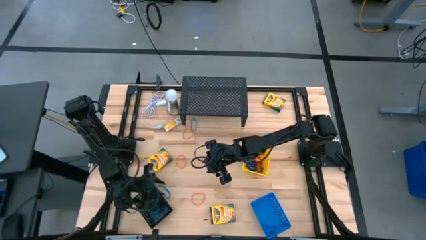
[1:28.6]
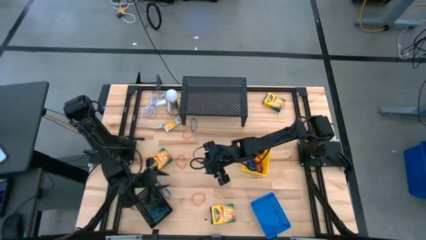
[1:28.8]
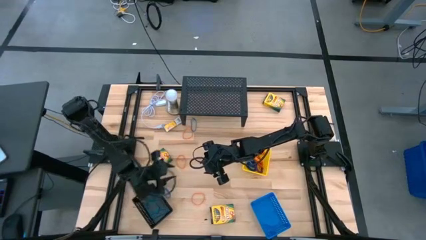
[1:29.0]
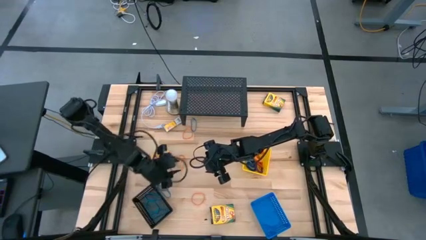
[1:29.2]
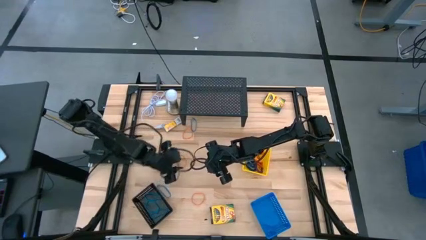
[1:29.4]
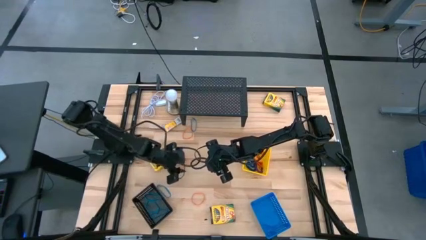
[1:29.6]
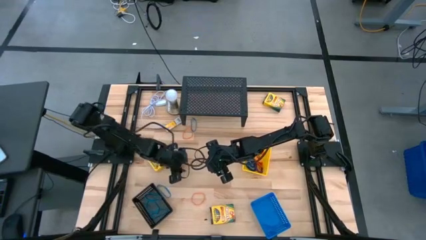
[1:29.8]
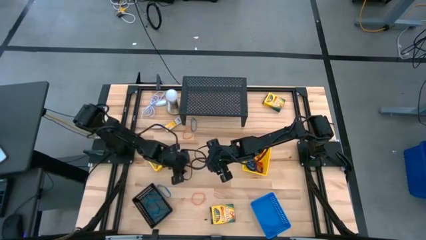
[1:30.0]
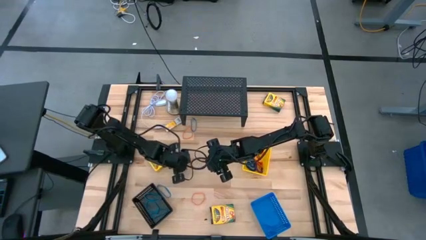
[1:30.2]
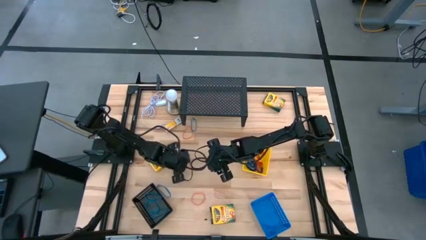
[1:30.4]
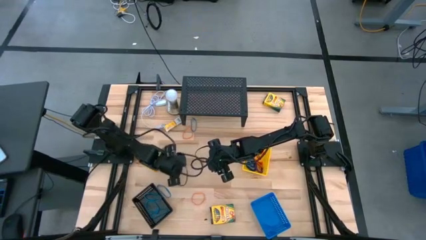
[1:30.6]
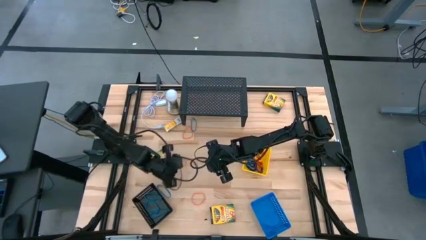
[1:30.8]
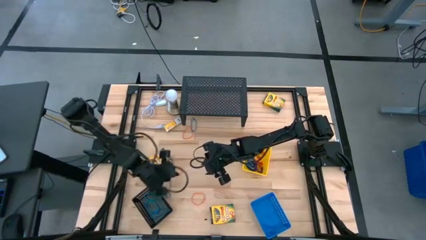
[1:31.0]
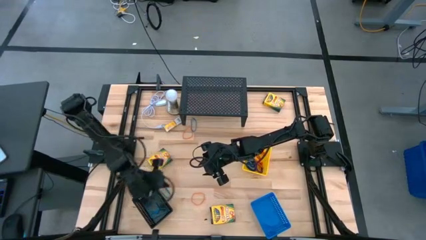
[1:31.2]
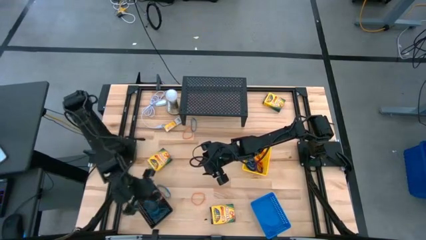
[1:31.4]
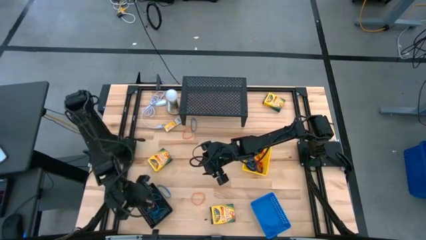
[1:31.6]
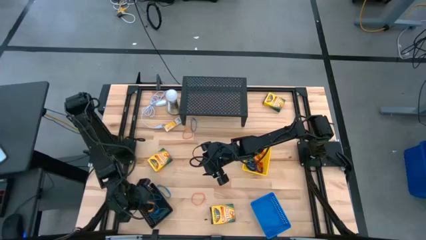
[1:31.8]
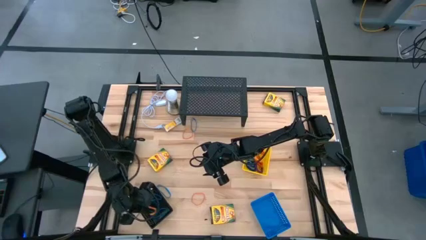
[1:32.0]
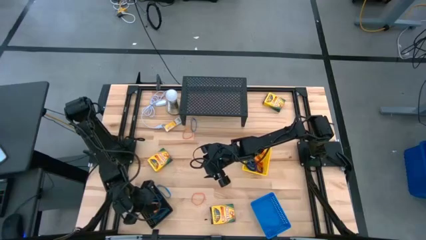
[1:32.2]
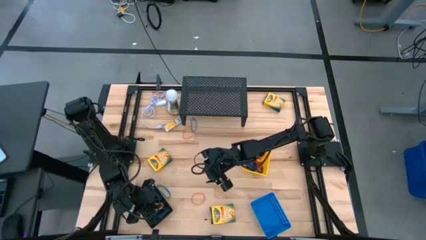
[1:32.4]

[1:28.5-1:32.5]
Task: Pick & Place Office Desk Supplies
Put the orange rubber band into the black basket

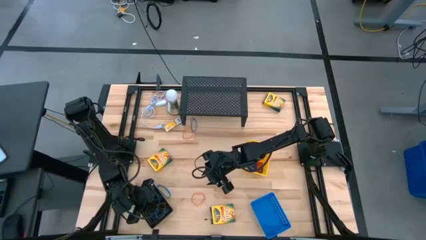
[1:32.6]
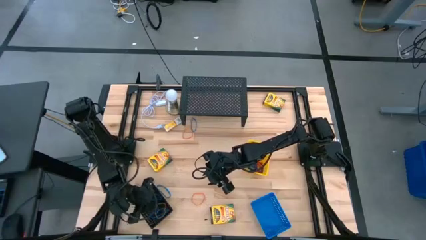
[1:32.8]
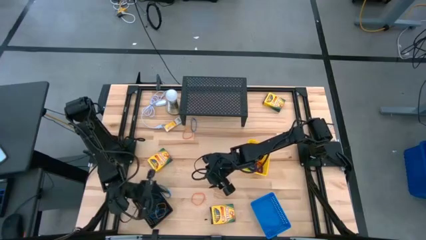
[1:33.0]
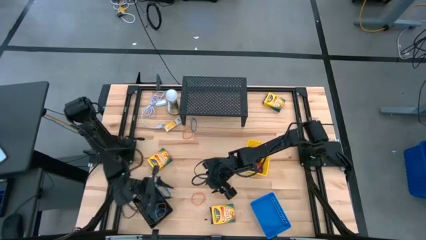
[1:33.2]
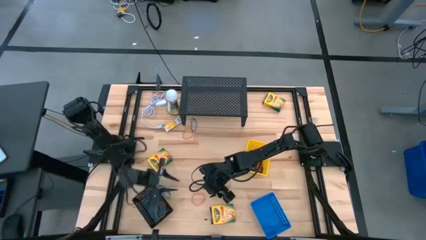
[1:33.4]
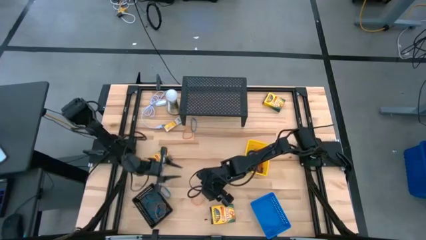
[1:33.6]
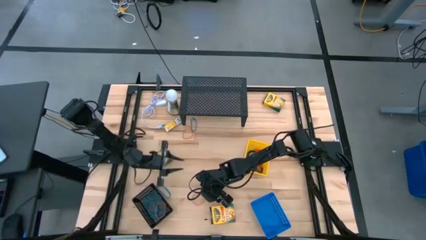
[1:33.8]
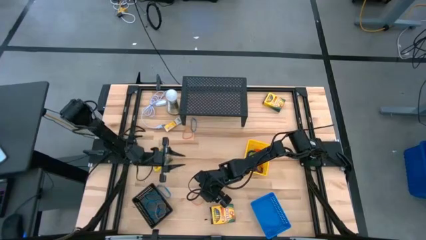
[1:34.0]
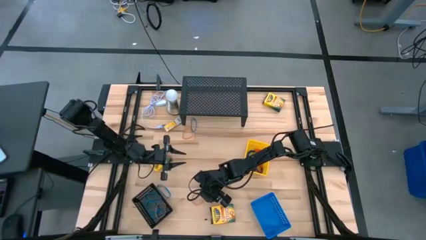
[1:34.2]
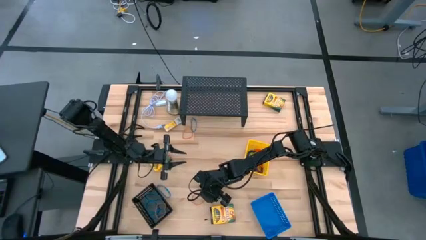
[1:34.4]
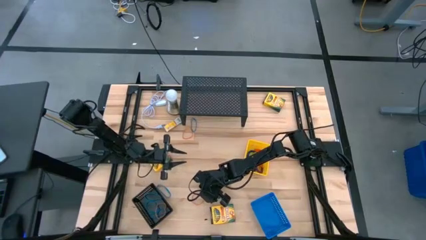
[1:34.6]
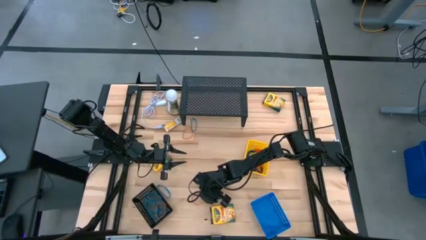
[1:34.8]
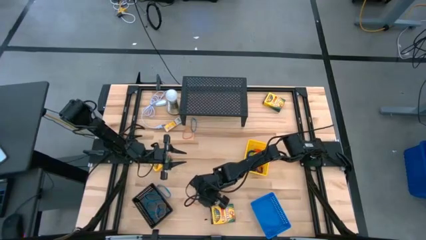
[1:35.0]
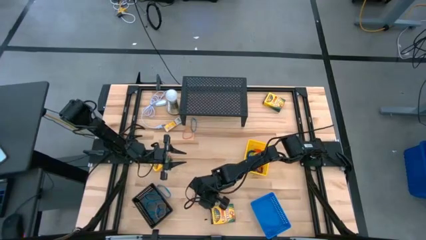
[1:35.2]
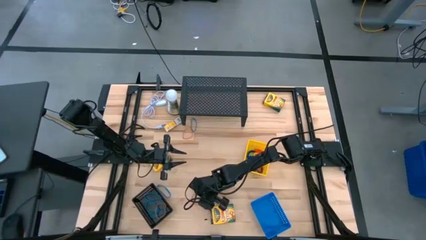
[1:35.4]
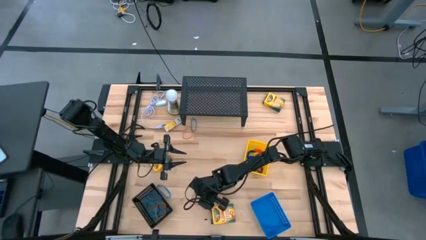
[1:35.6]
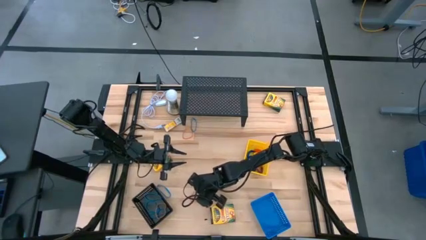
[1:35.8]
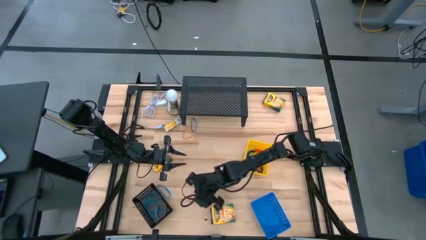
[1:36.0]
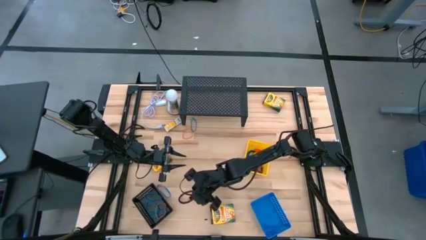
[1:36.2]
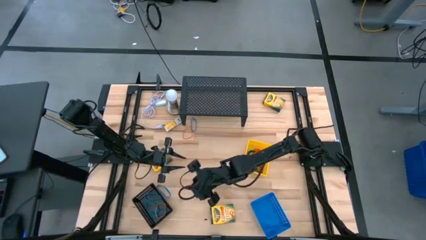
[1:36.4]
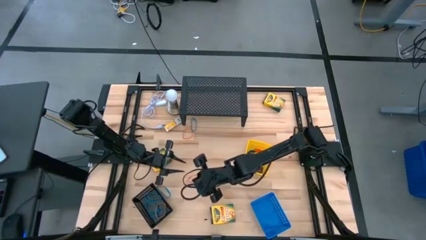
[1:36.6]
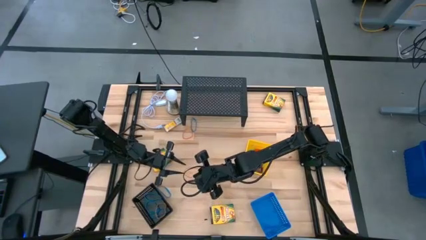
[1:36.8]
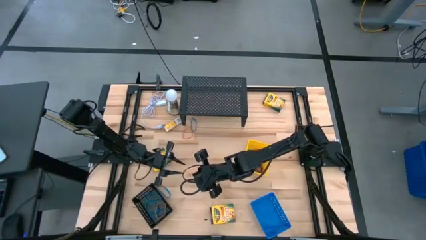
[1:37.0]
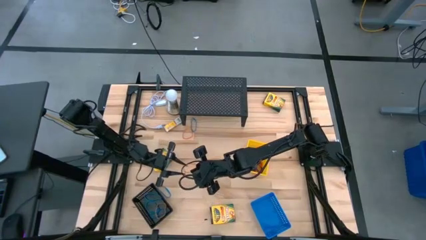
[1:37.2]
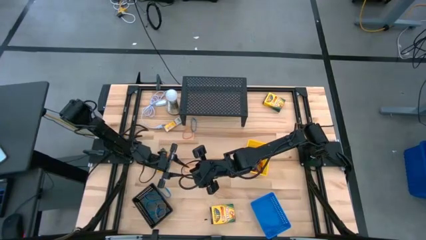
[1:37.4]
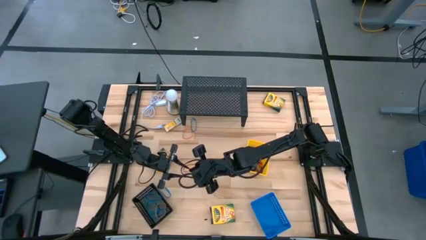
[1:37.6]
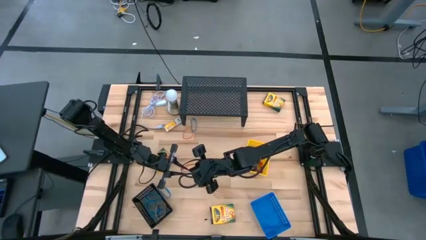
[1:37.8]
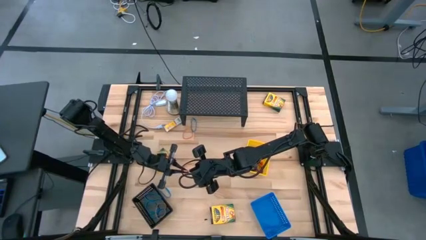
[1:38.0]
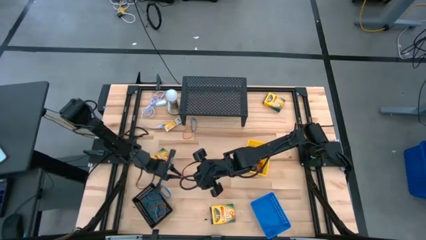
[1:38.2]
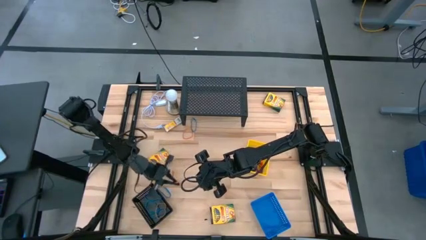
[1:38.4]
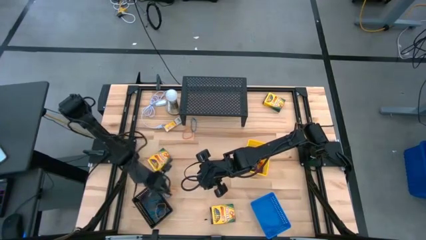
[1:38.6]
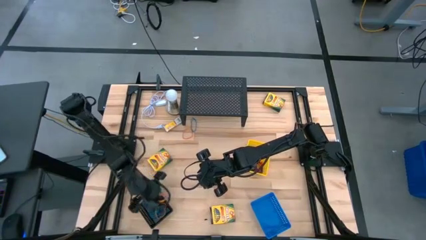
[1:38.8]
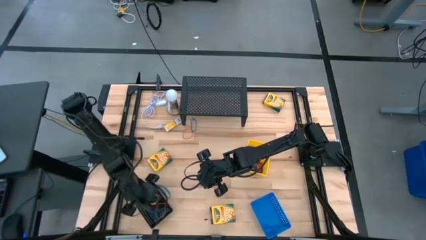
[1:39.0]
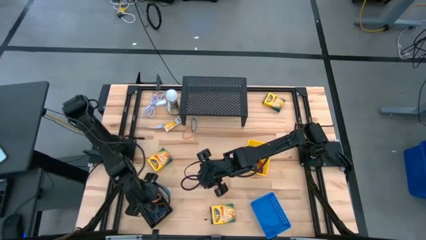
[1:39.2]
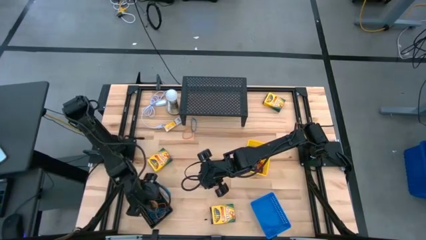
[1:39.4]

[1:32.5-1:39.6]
Put the orange rubber band into the black basket

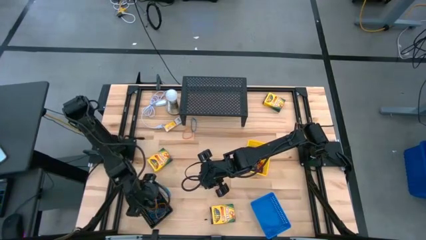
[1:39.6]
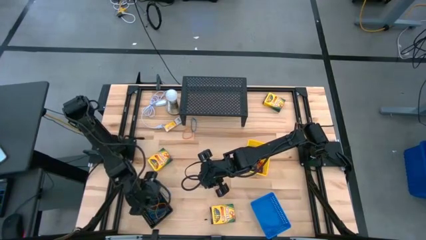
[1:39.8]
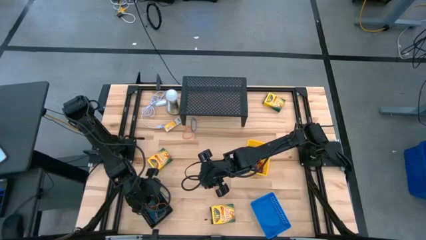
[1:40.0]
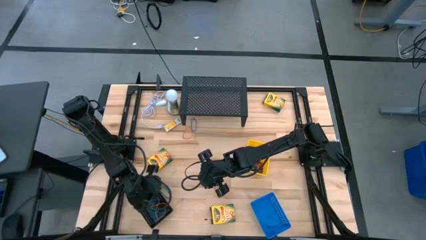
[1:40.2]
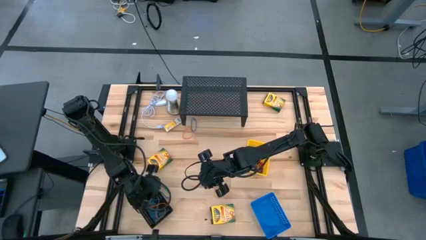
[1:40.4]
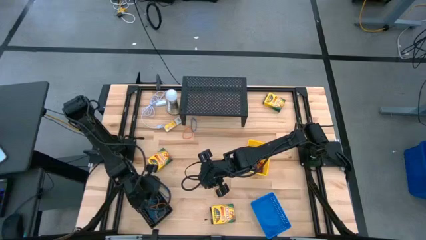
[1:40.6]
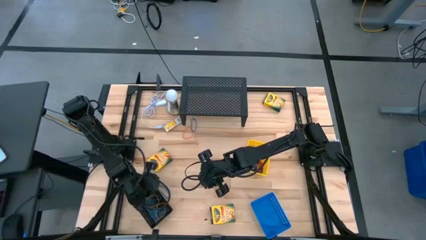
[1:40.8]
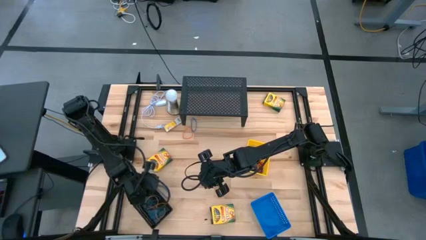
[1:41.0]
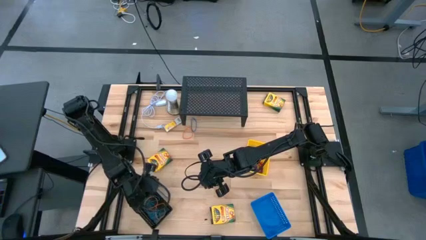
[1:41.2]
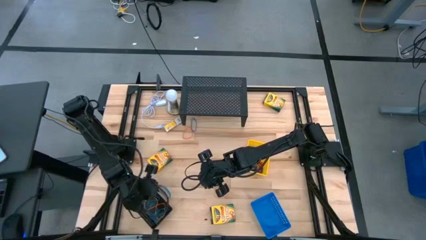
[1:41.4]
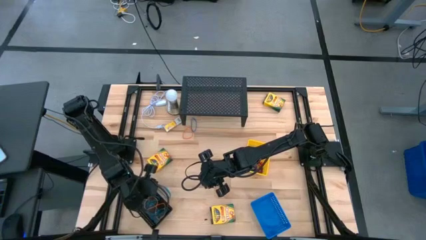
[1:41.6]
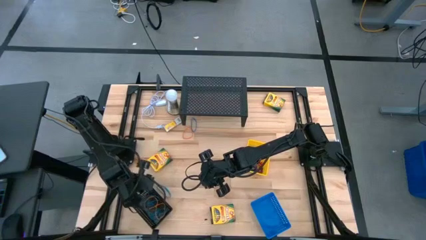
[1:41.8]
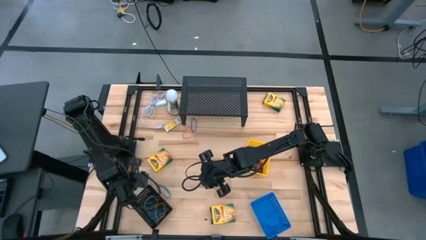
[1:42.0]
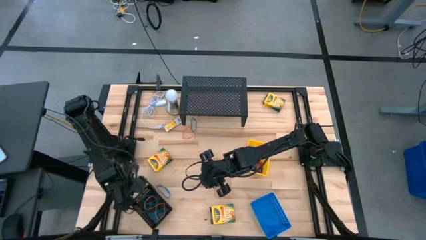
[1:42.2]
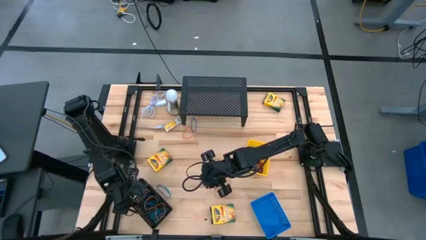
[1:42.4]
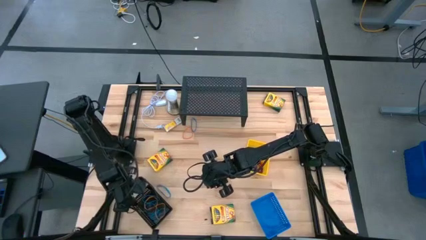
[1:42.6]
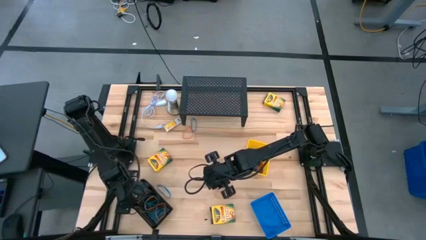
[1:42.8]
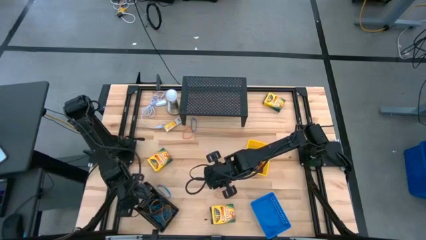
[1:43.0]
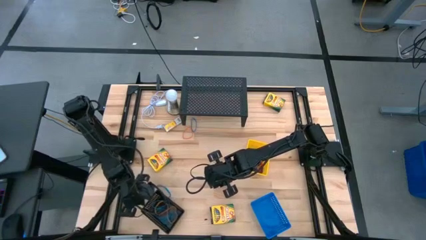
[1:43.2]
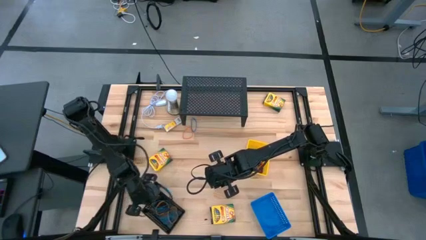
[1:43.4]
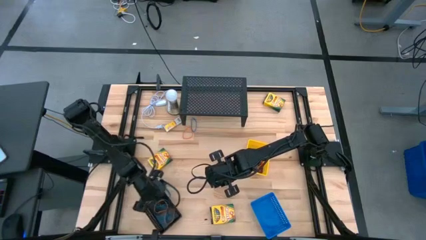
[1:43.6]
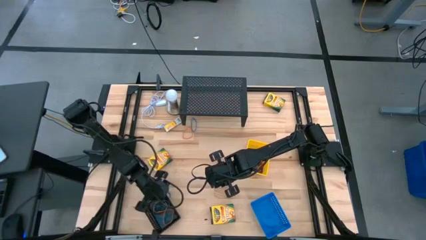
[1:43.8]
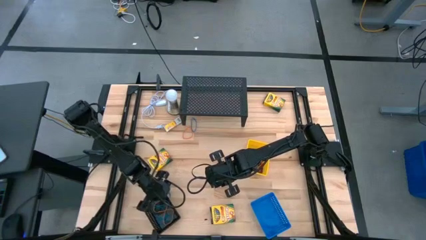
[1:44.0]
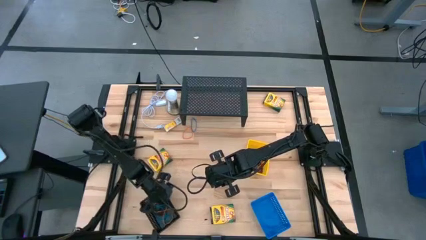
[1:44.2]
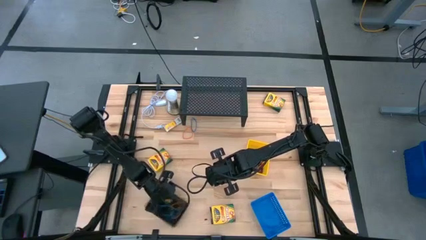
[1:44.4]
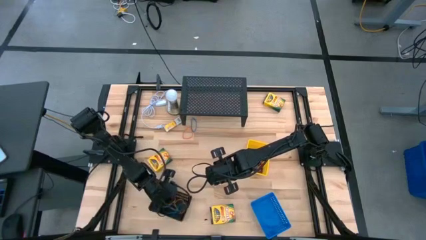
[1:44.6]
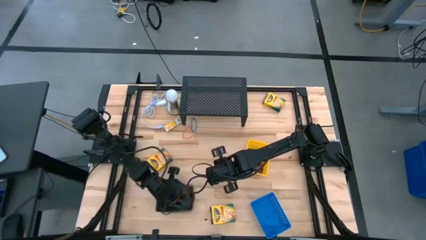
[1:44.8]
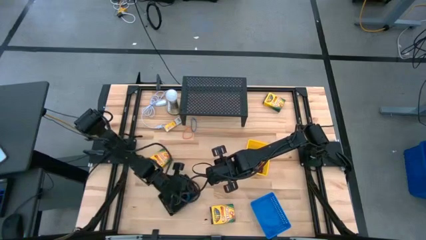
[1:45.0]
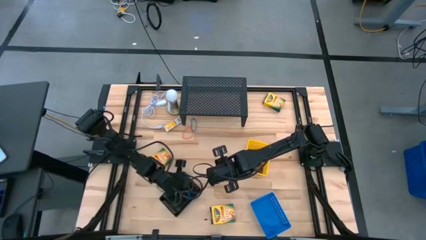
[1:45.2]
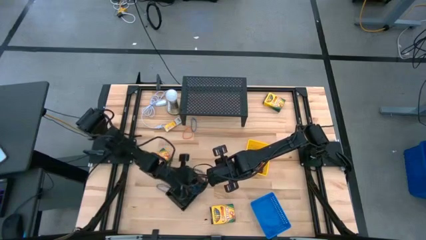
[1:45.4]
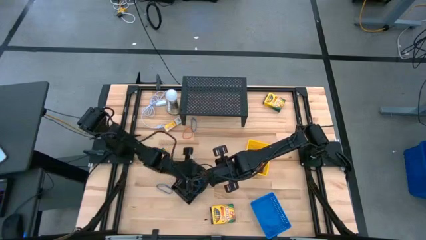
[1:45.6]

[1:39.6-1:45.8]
Move the black basket to the center of the table
